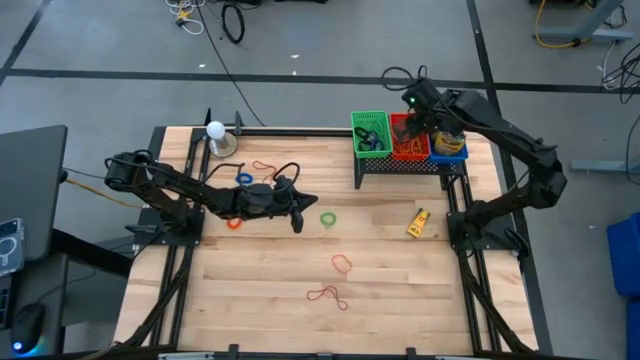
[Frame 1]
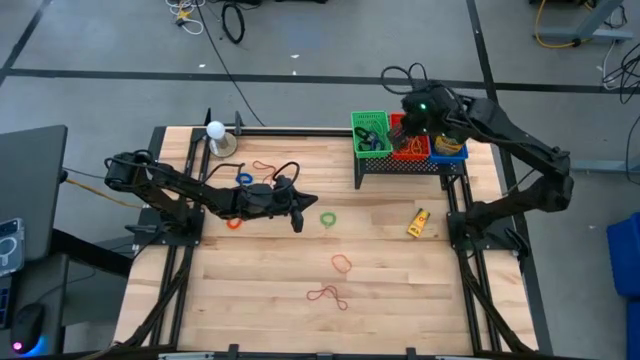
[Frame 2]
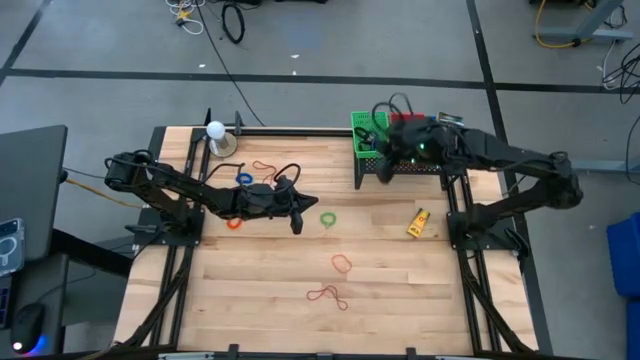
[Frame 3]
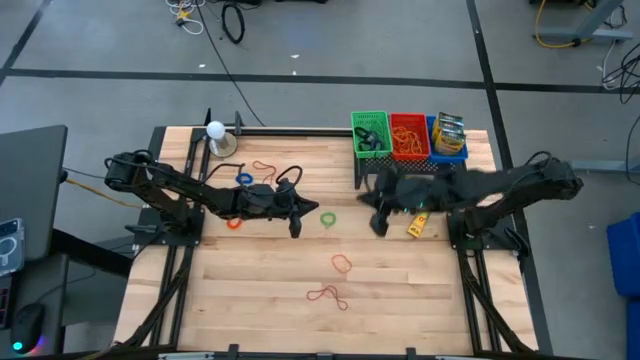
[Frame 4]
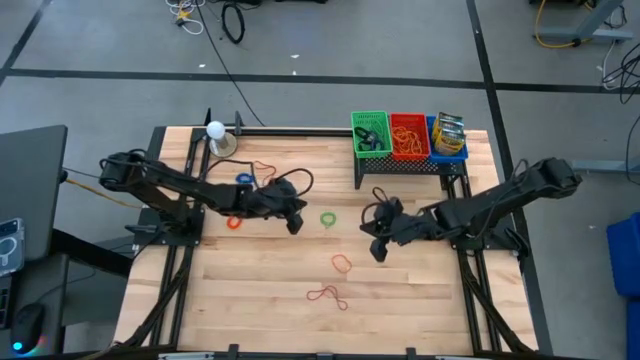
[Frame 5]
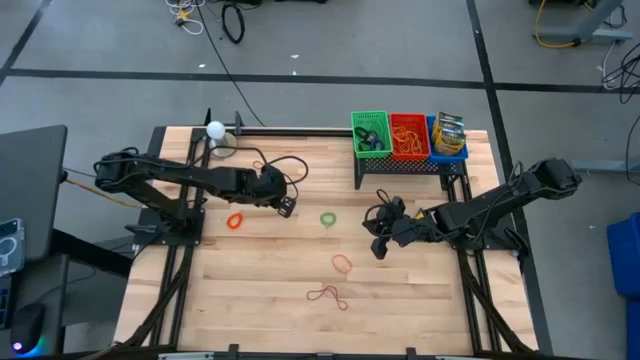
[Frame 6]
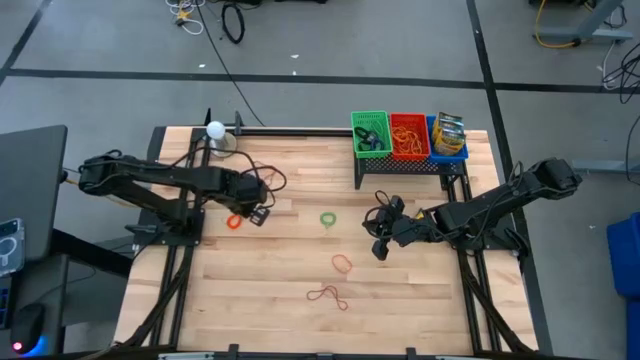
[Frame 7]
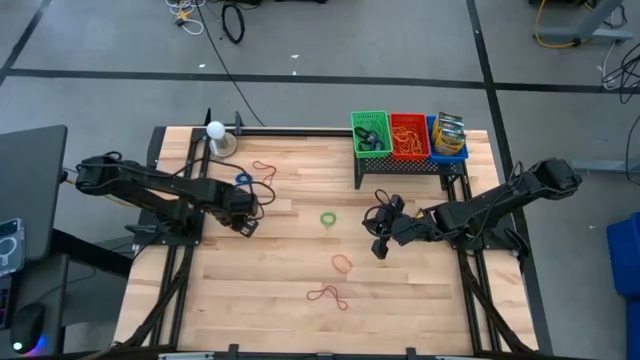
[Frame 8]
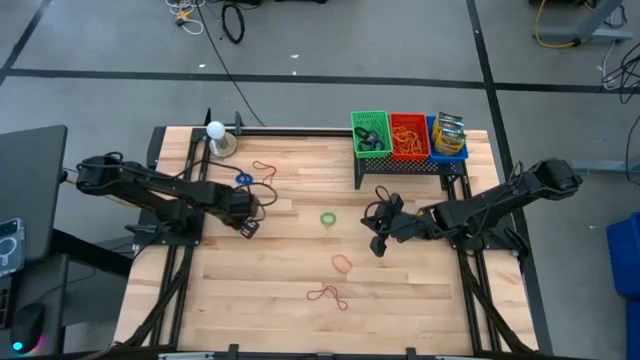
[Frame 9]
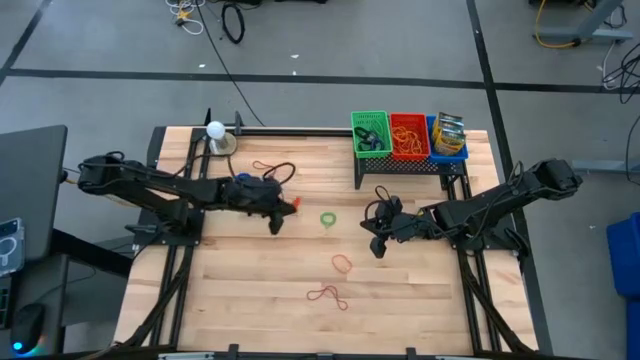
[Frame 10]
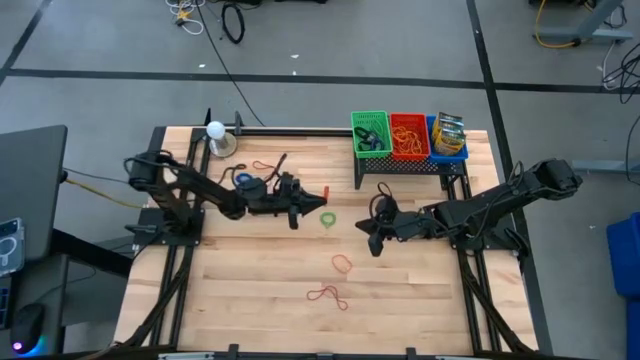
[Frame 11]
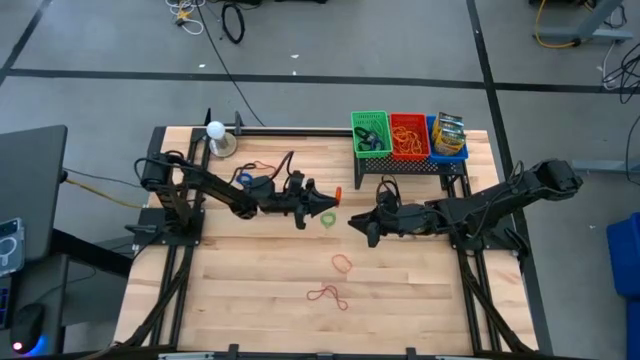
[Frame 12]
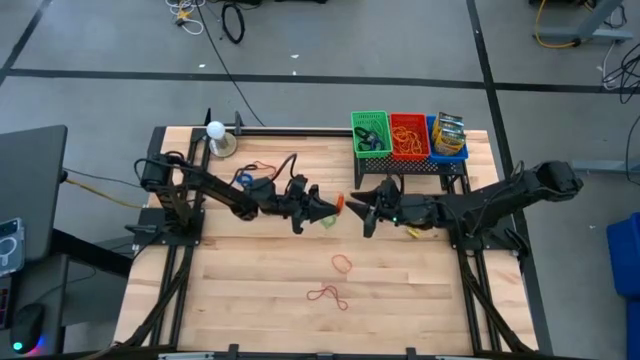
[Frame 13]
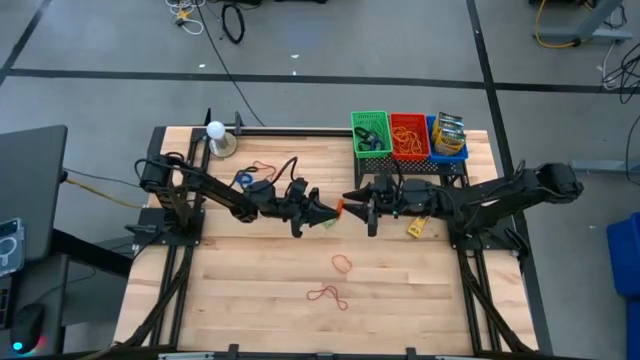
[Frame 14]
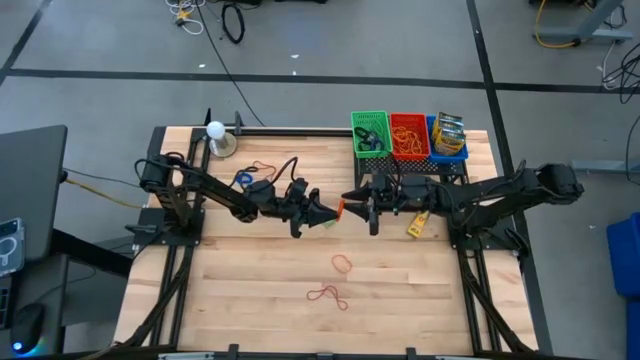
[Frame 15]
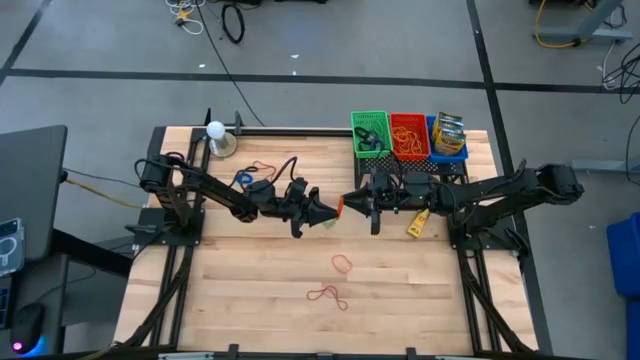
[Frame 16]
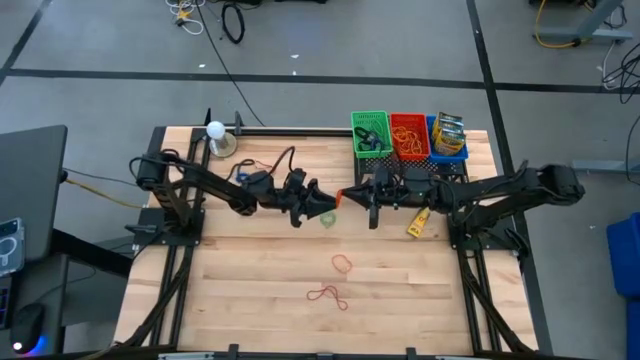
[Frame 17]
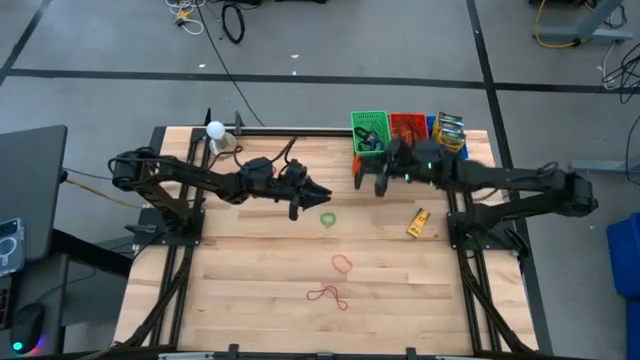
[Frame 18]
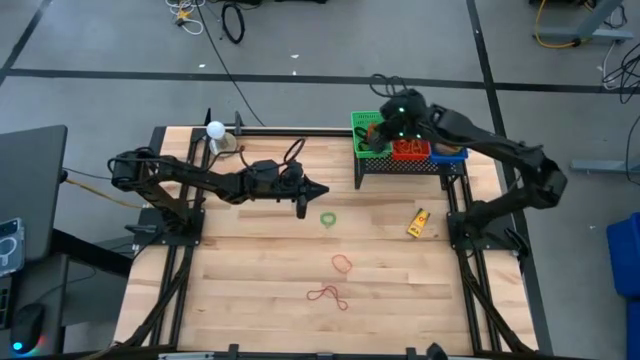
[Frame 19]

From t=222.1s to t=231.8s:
Task: Pick & Place Office Desk Supplies
Put the orange spring keychain into the green bin

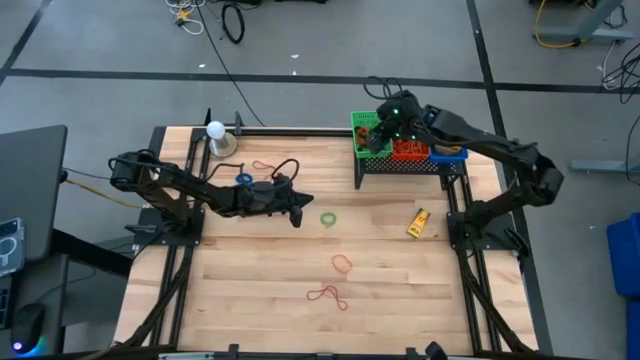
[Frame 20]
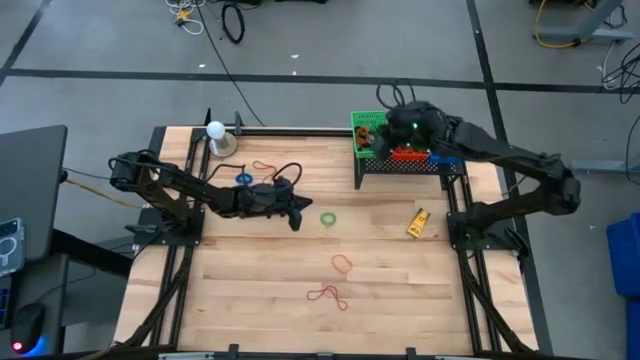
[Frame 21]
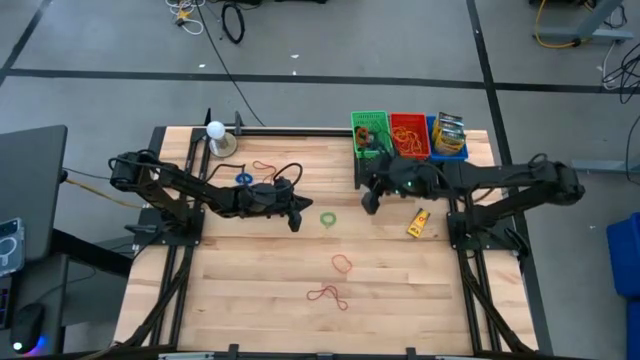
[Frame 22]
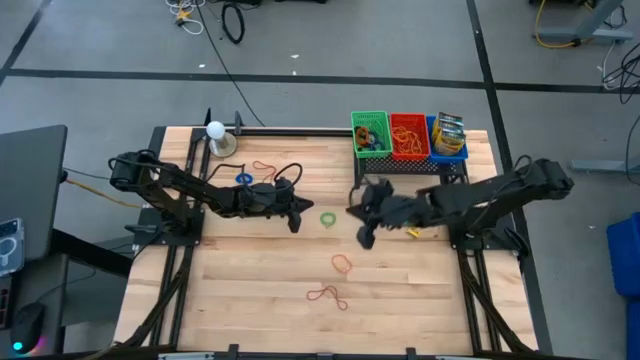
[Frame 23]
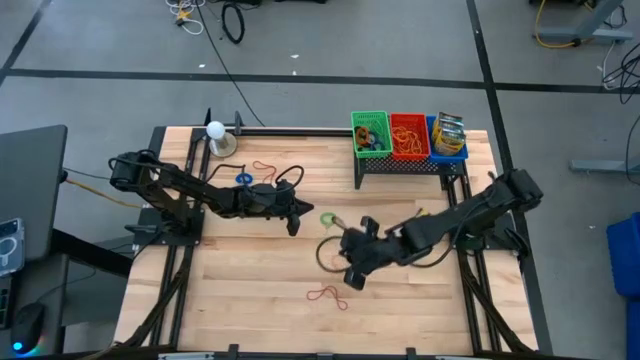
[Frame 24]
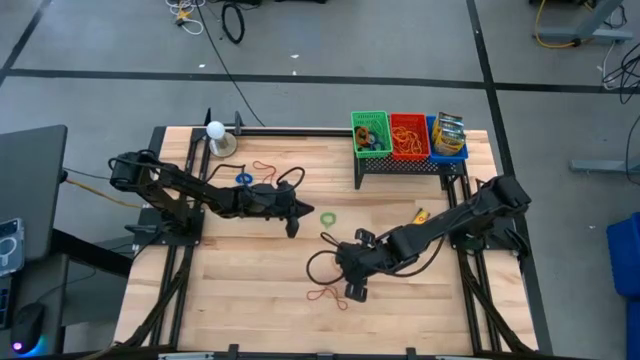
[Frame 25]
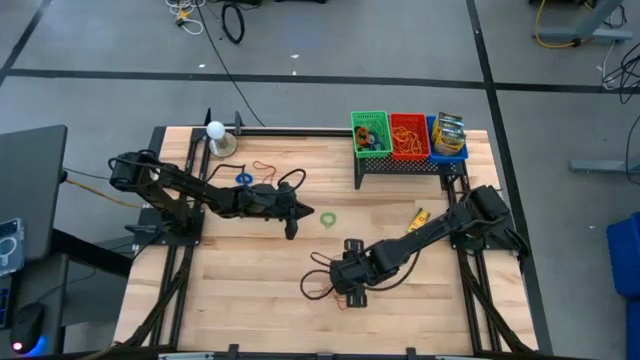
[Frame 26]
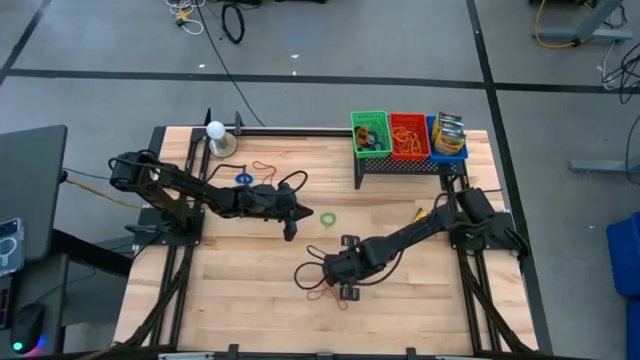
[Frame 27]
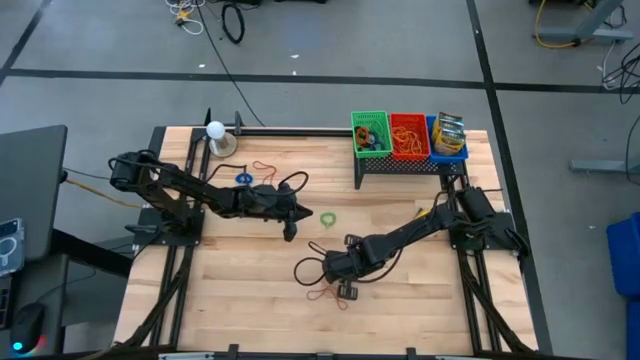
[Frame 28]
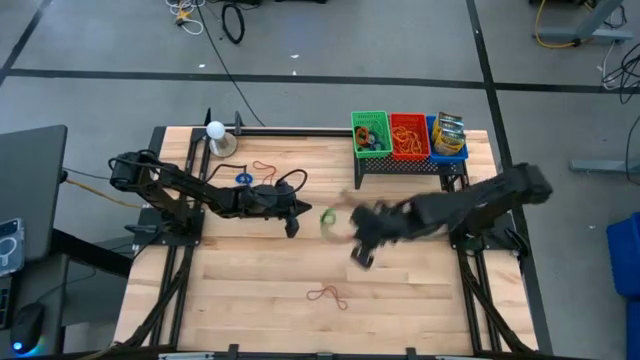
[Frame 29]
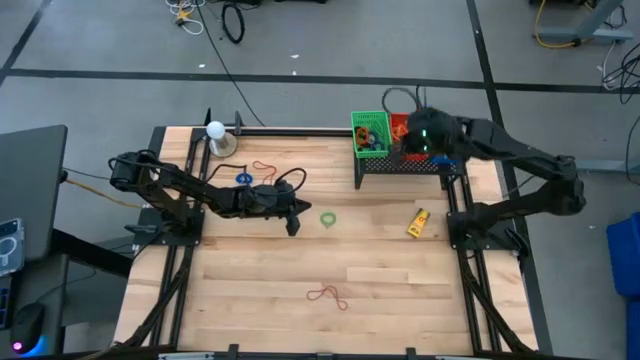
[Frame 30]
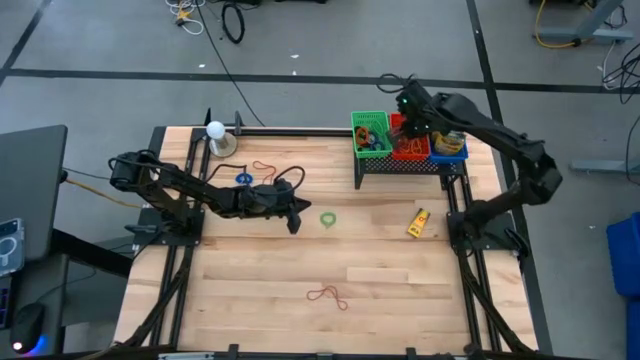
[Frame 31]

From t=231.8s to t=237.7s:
Put the orange rubber band into the red bin

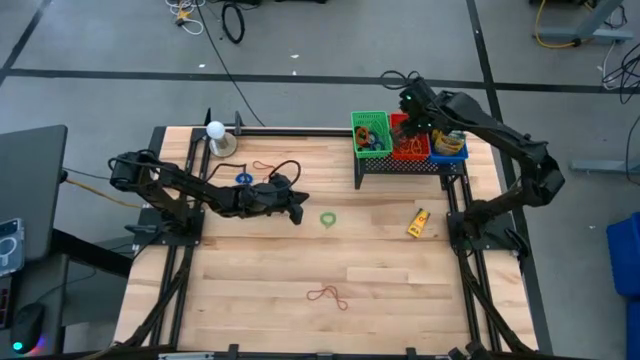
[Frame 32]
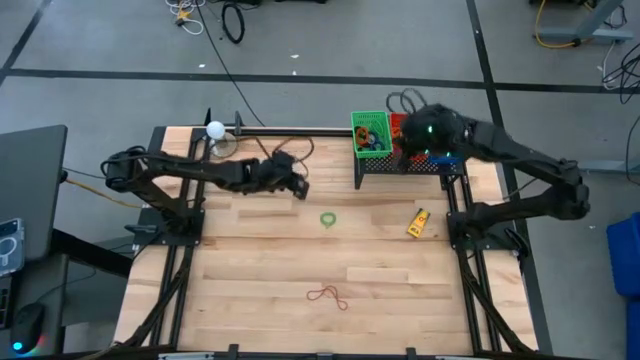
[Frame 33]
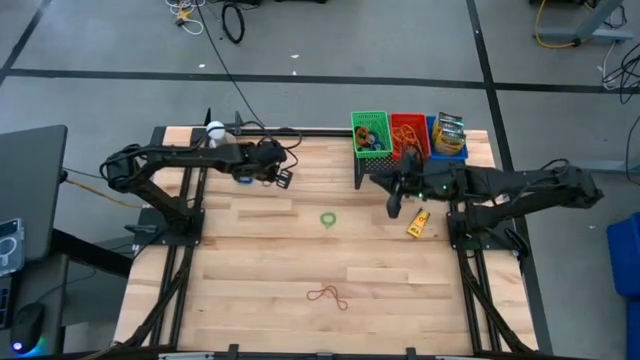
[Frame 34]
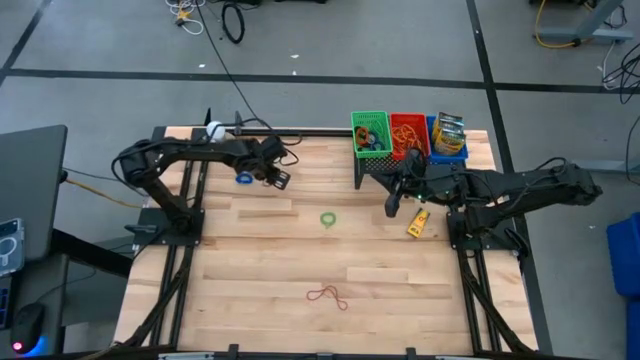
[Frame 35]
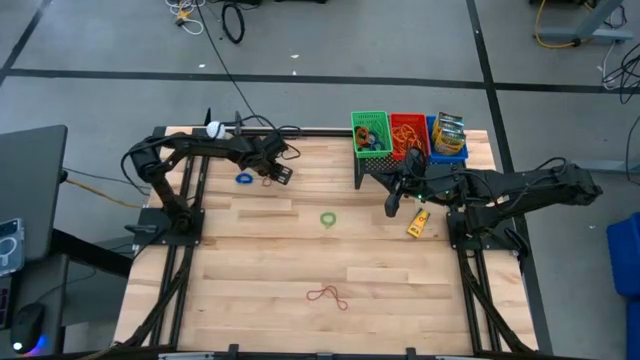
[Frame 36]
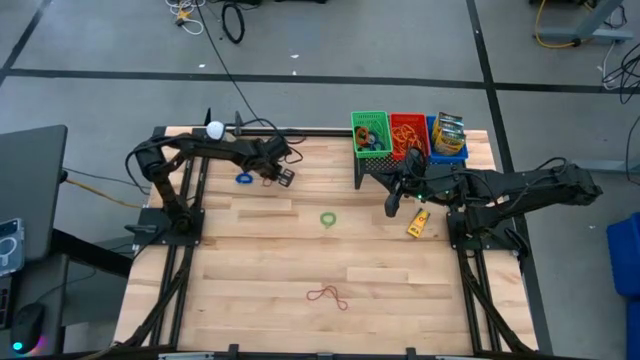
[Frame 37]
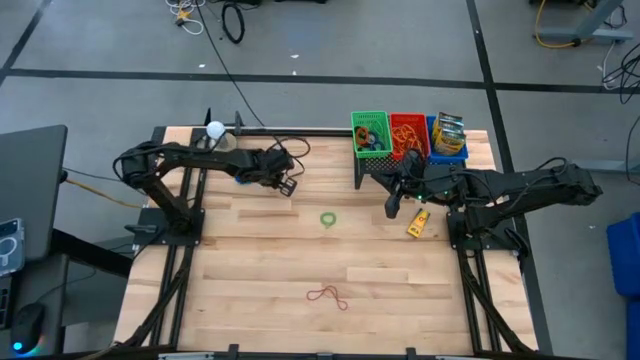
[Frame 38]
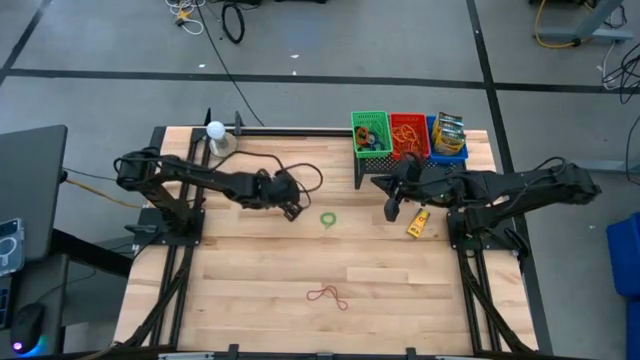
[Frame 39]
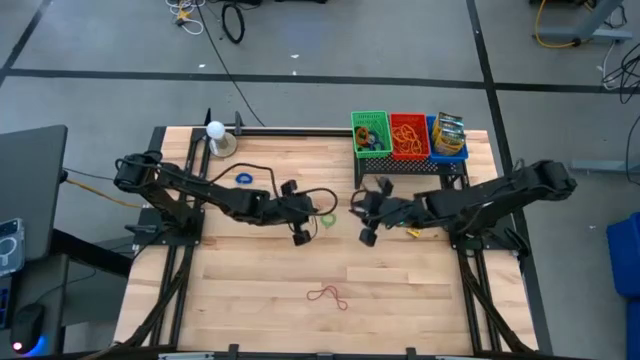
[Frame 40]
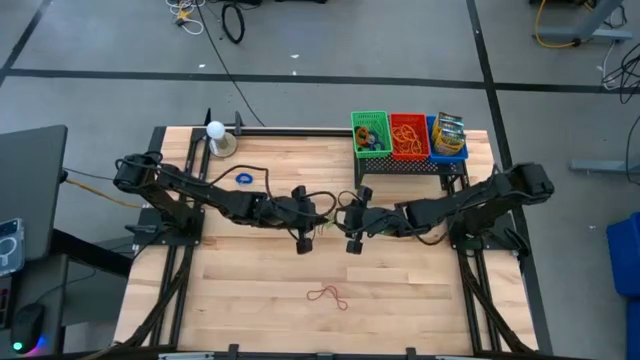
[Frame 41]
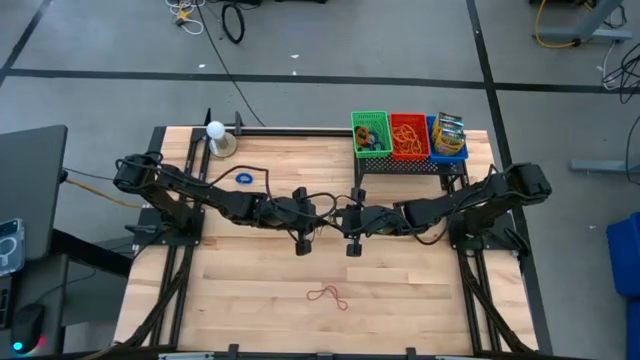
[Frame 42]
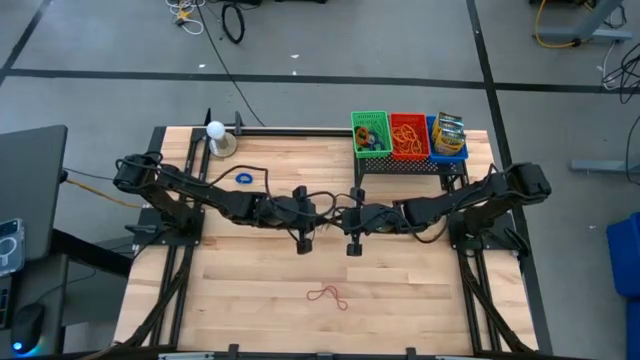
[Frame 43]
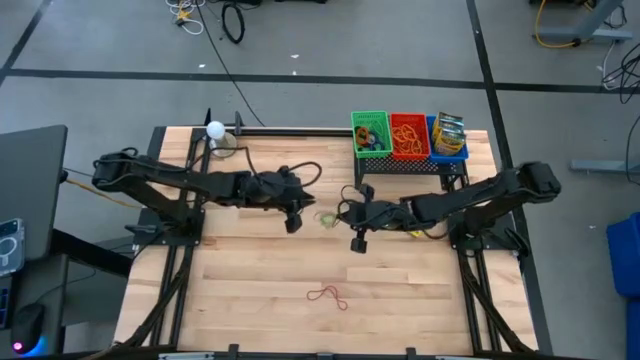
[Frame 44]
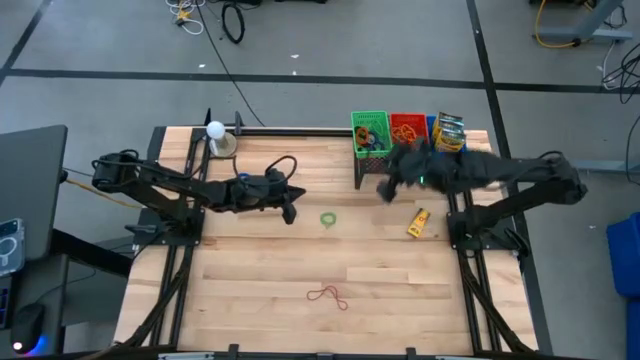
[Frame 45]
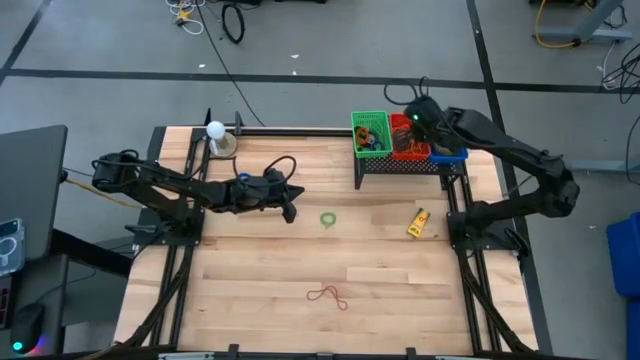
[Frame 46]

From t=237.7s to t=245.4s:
Put the red rubber band into the red bin
